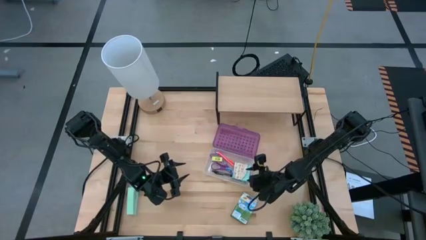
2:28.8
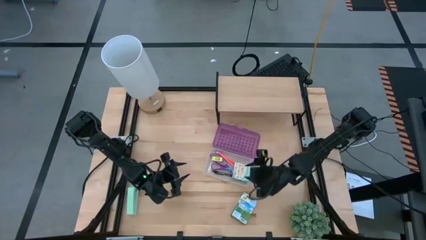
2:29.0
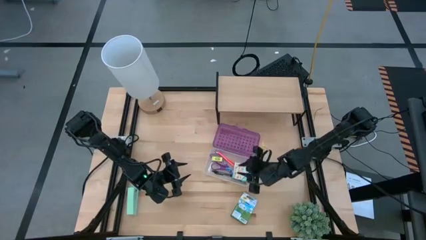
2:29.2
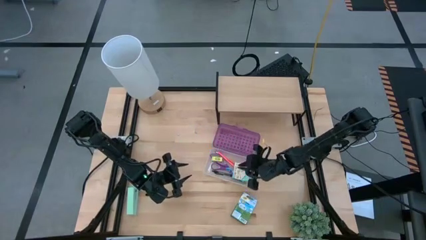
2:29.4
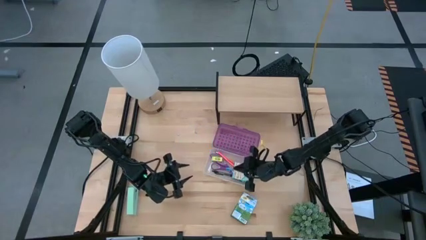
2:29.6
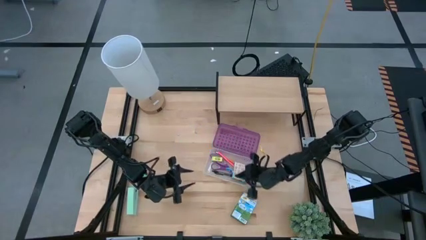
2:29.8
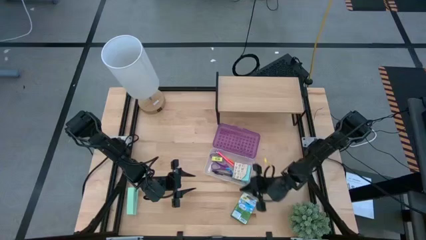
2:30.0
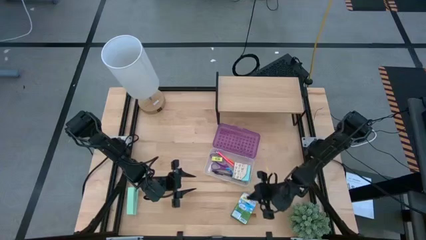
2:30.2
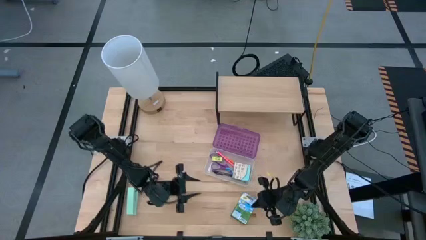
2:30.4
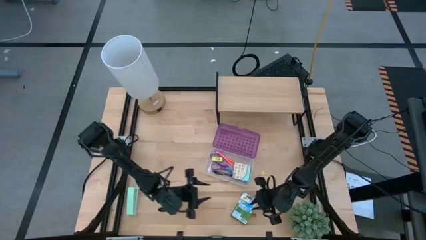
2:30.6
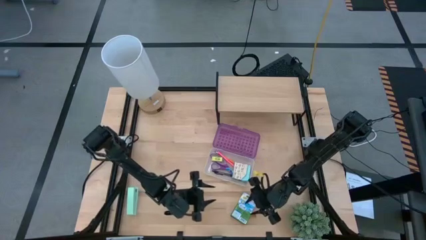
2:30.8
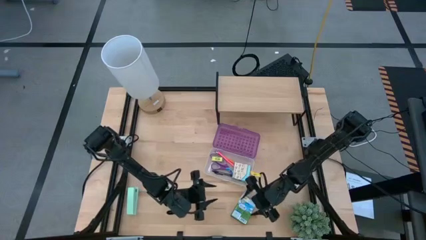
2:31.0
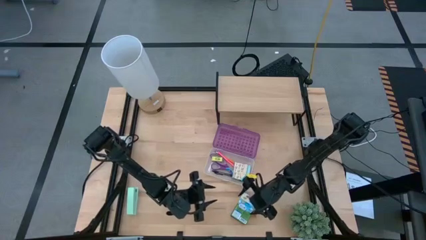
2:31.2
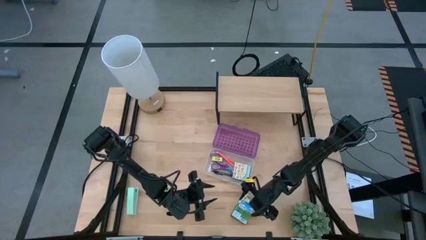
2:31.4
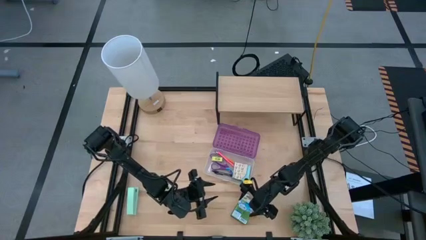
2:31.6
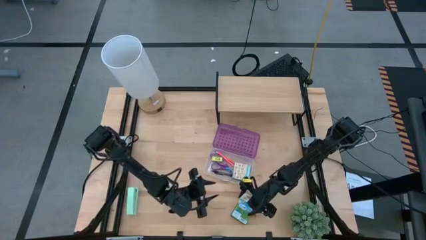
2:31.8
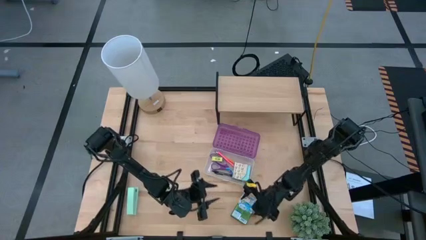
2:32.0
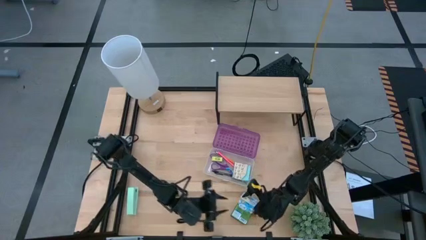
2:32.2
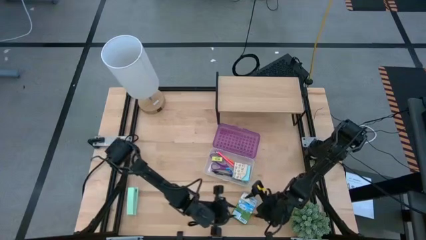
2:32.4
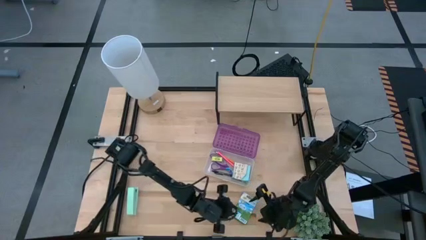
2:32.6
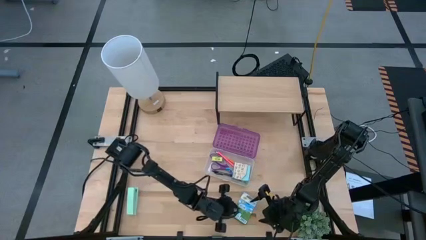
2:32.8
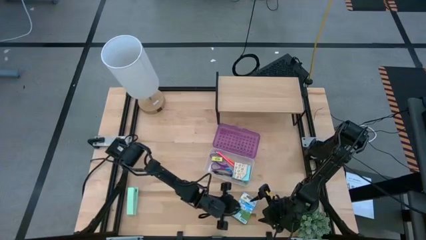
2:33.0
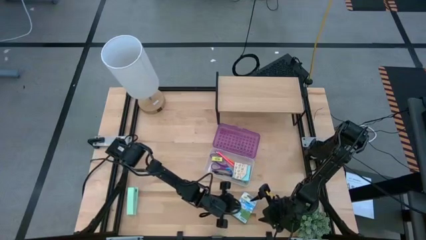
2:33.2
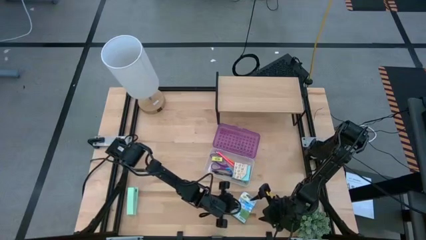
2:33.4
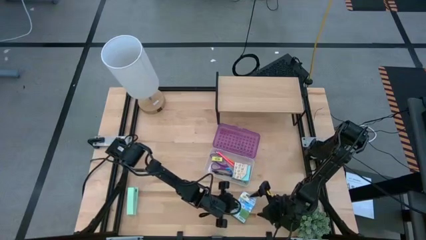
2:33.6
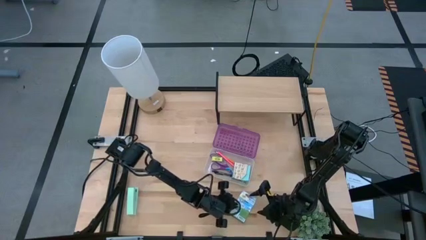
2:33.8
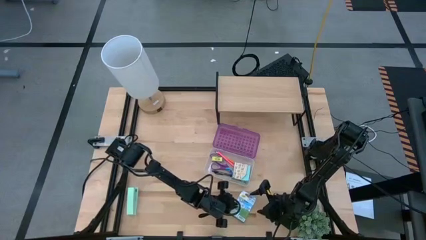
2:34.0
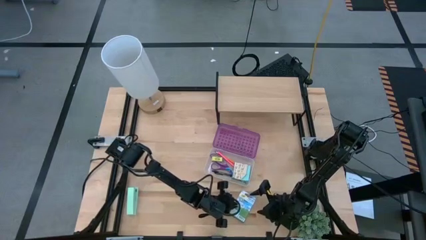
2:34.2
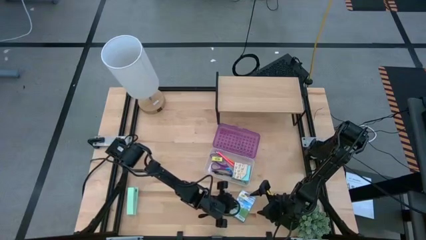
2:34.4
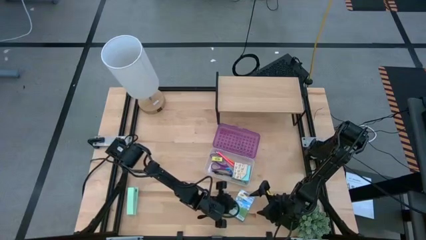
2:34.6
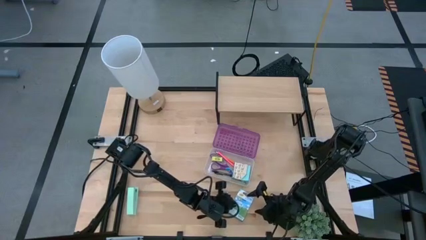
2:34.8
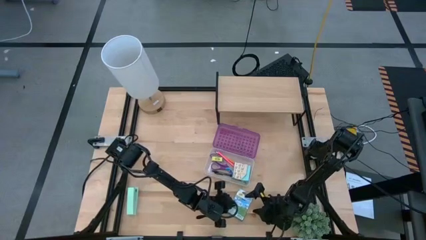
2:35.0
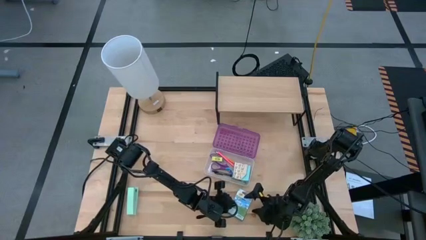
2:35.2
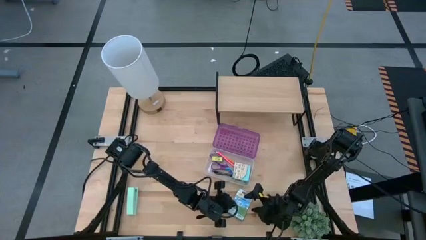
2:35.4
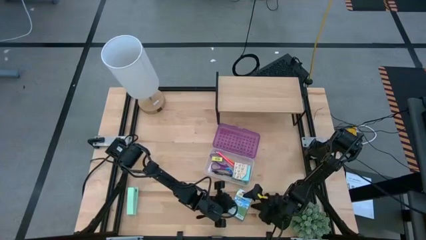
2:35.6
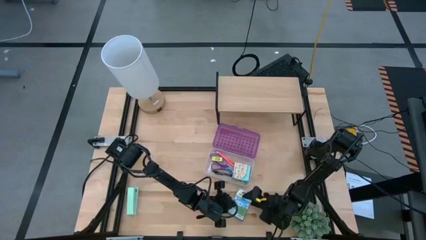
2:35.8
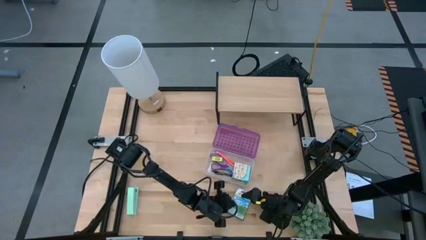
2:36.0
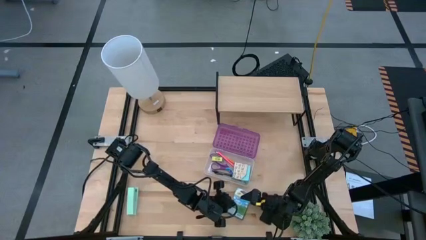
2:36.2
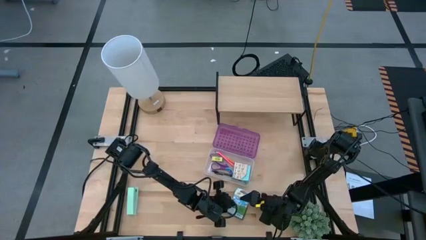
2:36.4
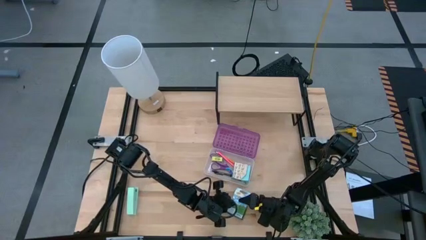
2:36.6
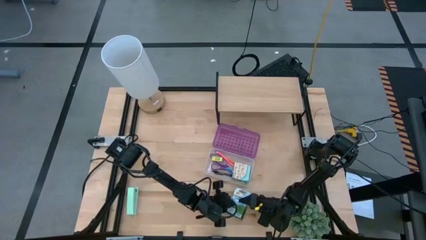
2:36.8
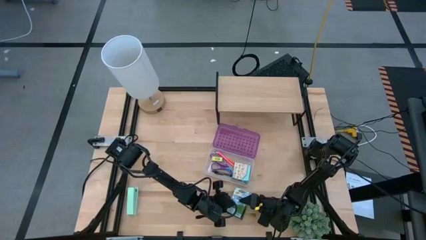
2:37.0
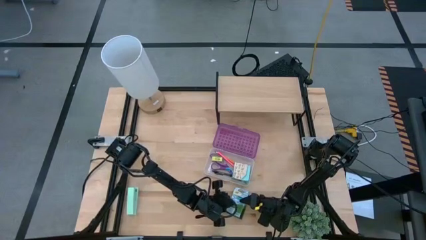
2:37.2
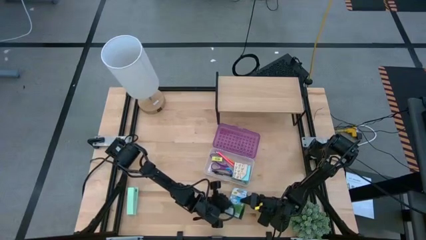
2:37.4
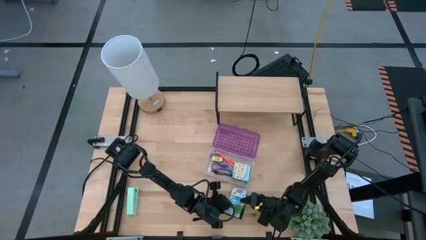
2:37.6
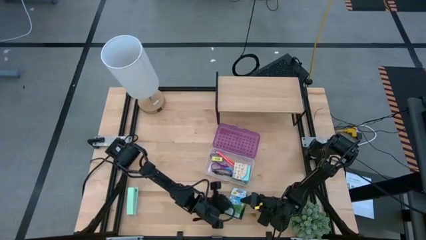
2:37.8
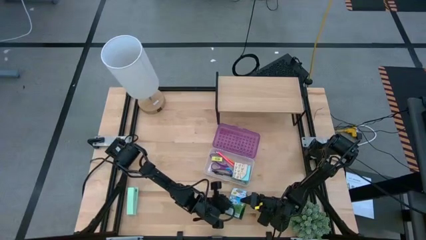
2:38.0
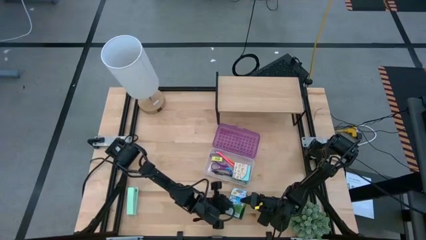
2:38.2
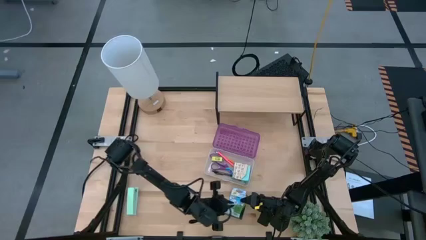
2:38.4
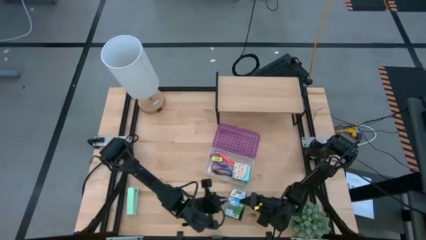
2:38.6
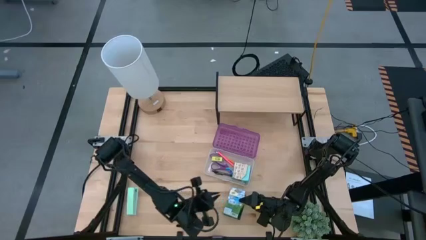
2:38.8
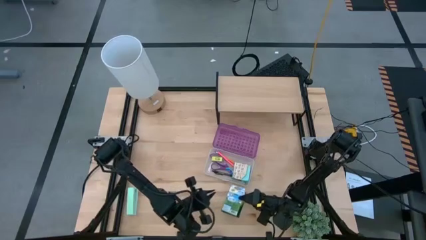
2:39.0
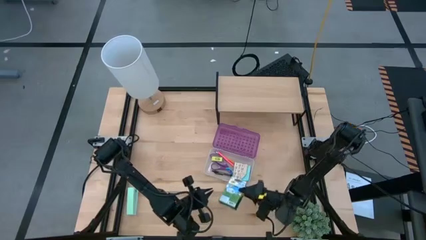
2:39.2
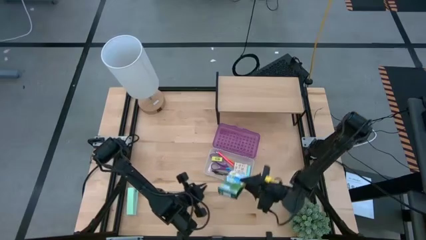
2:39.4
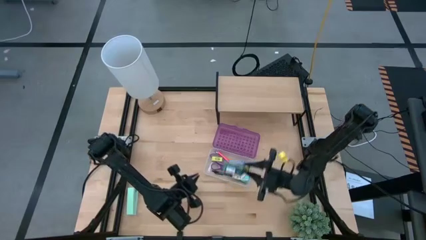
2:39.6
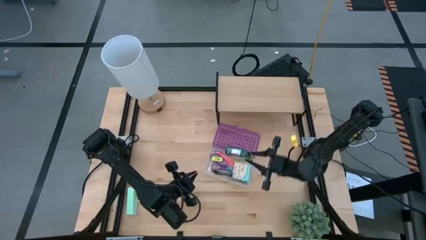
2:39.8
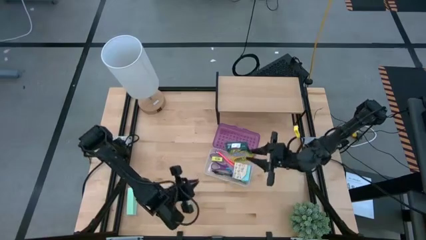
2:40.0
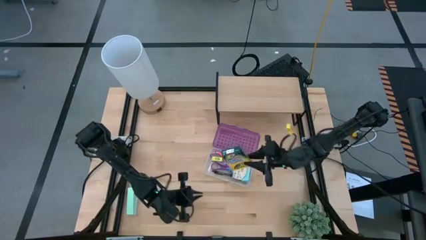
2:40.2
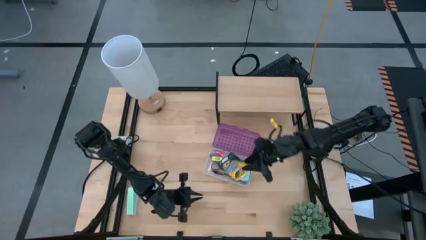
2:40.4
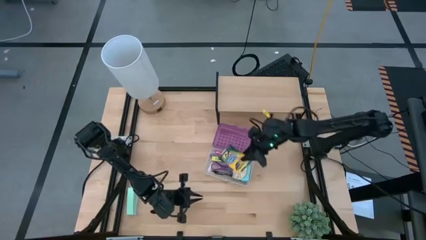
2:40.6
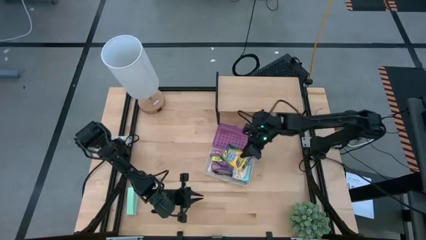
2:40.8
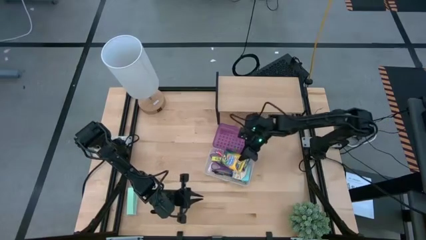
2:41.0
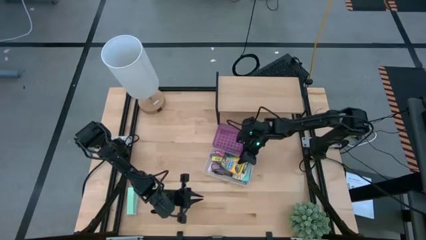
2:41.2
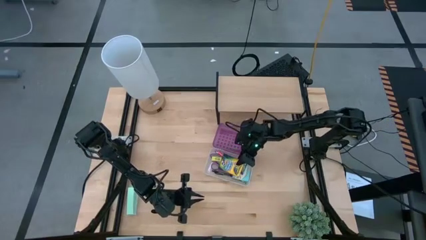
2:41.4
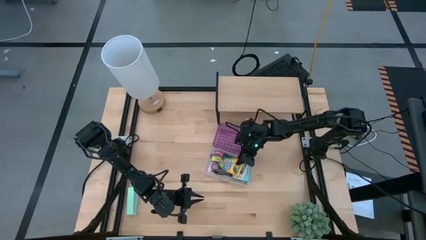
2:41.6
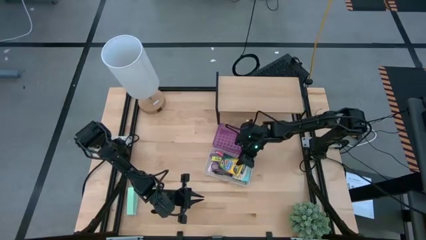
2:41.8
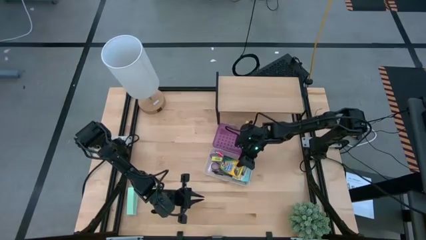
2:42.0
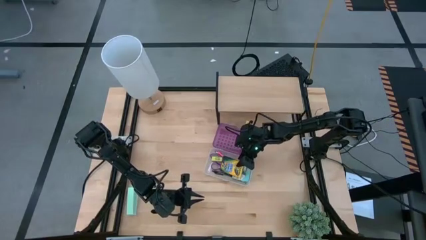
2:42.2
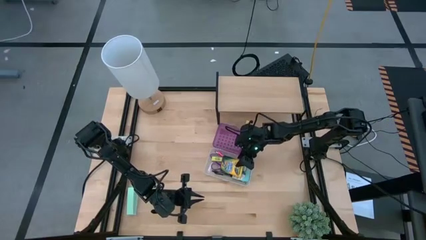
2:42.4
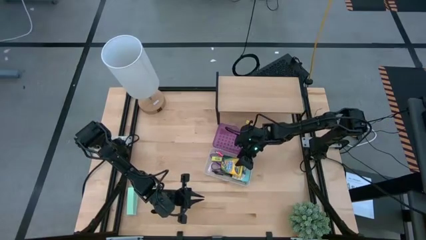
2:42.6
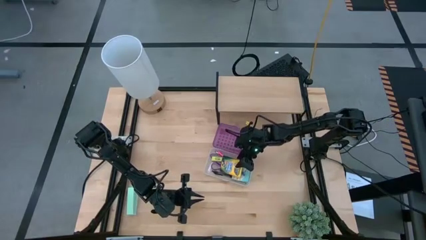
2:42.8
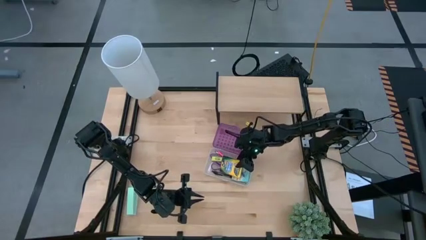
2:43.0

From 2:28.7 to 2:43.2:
Task: Pack school essentials
Put the yellow crayon box into the purple supply box

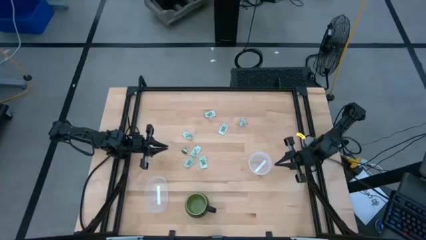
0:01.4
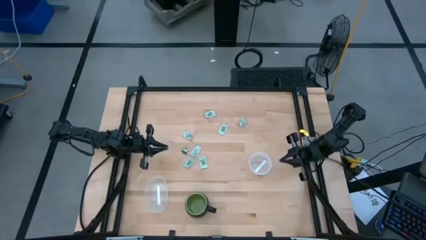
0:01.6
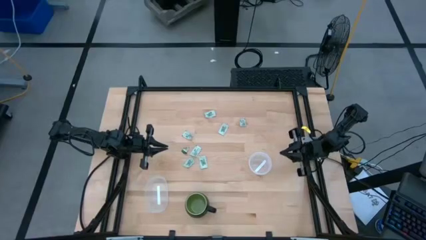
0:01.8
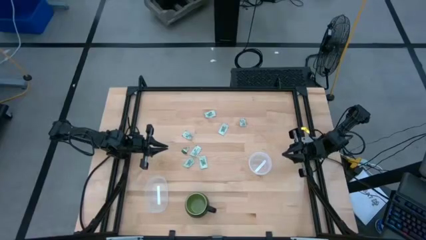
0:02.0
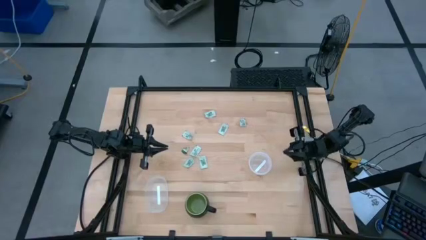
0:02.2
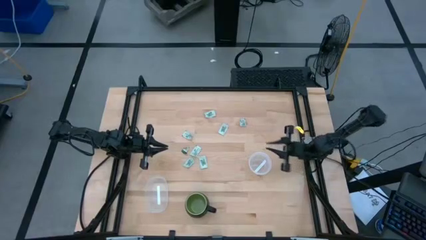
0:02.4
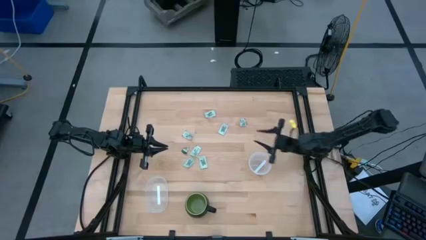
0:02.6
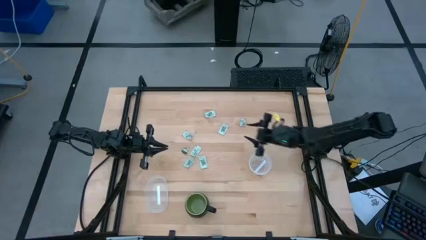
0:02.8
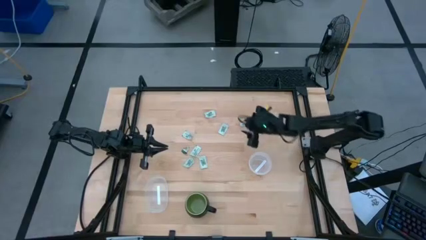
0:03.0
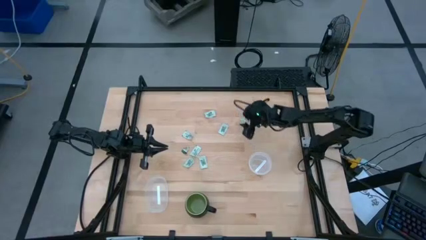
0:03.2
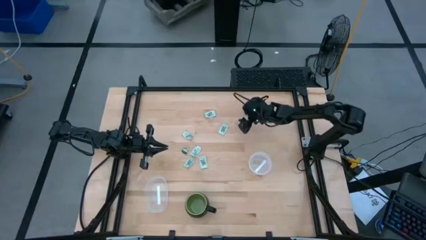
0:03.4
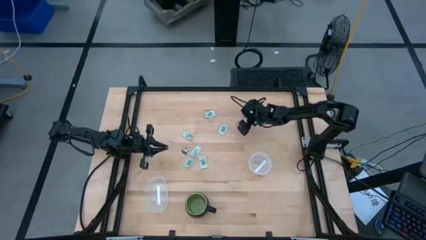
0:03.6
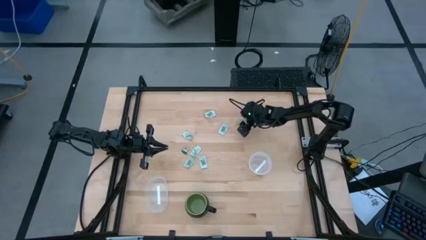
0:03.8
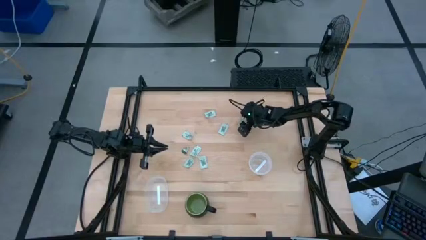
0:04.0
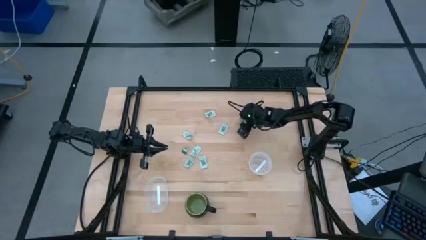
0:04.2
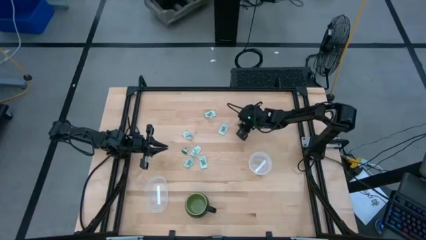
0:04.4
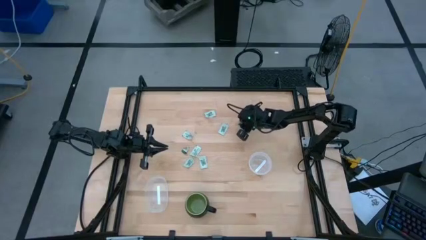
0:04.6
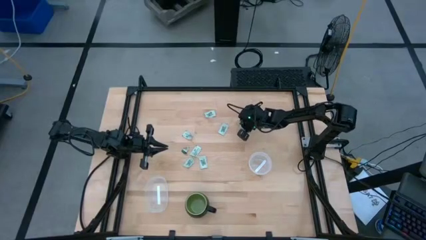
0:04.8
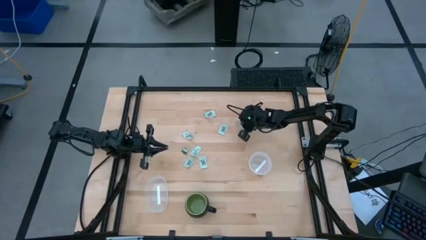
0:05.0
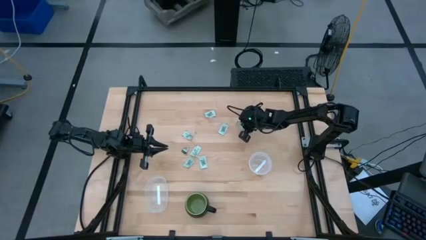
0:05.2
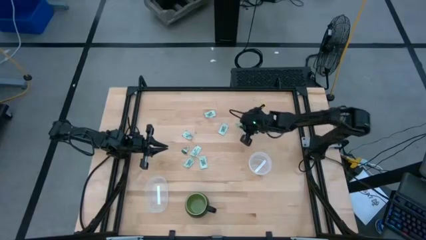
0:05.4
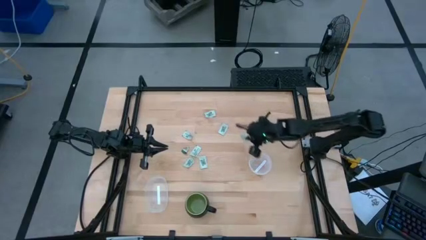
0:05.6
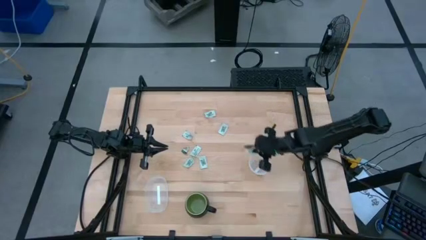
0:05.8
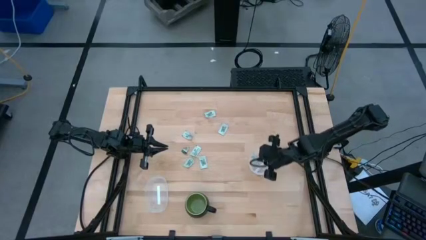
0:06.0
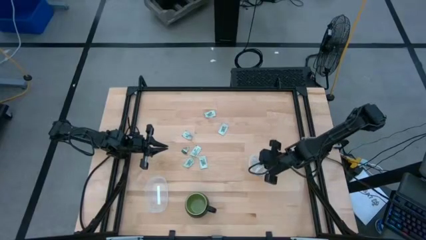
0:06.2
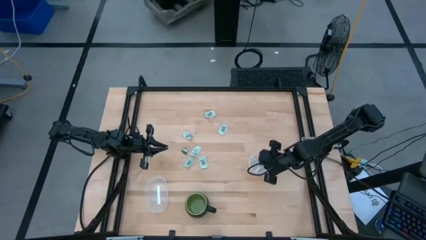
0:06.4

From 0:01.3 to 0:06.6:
Task: Pick and place Stevia / Truvia into bins
Put the white stevia packet into the circular transparent container
